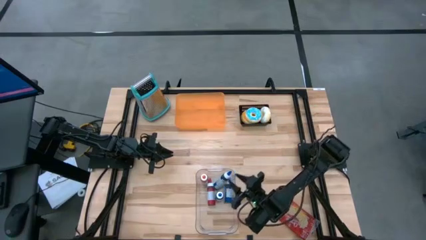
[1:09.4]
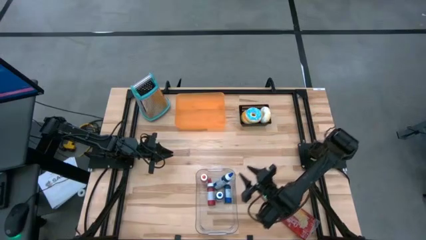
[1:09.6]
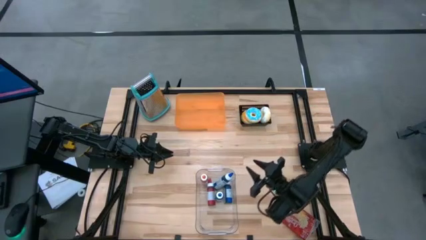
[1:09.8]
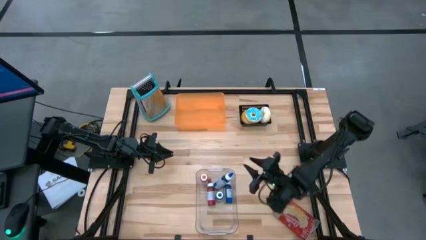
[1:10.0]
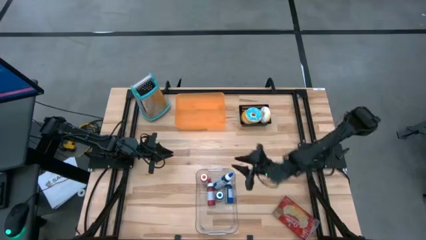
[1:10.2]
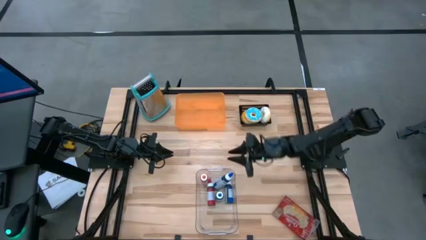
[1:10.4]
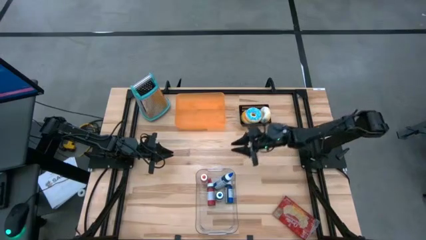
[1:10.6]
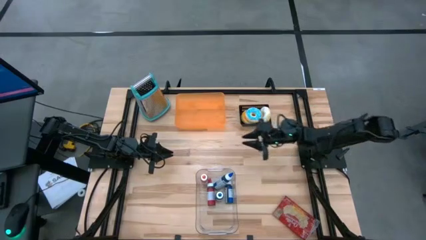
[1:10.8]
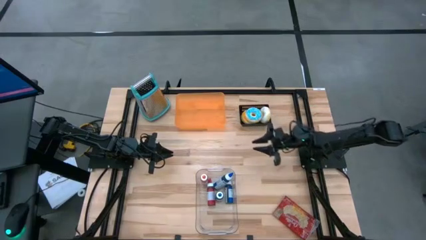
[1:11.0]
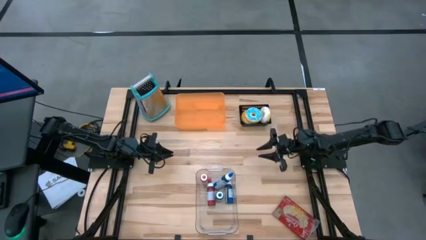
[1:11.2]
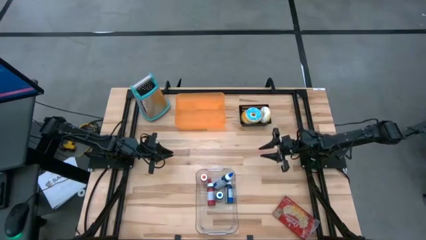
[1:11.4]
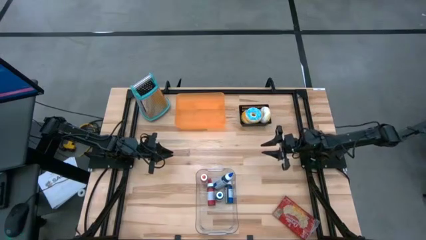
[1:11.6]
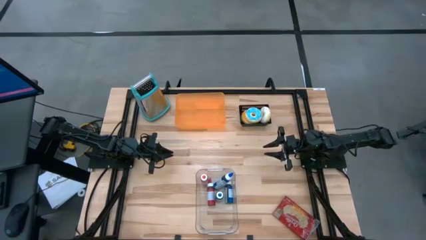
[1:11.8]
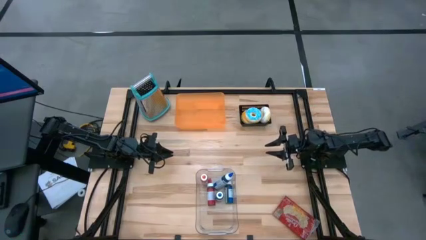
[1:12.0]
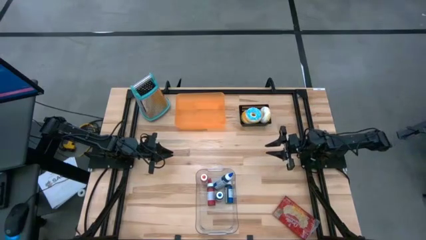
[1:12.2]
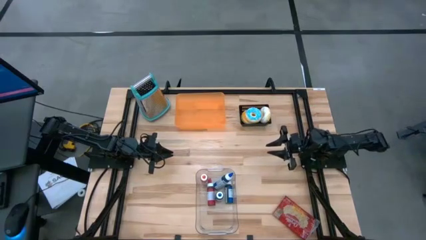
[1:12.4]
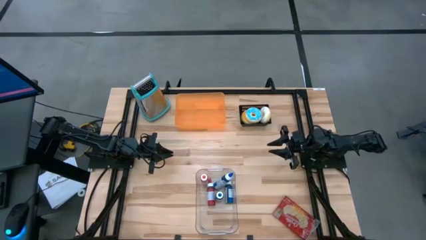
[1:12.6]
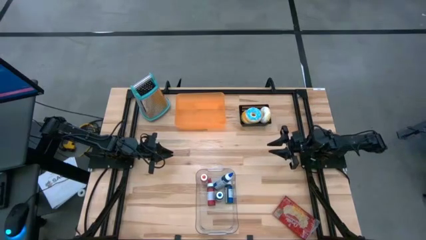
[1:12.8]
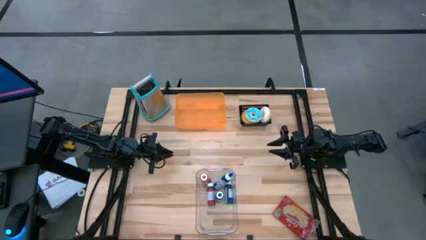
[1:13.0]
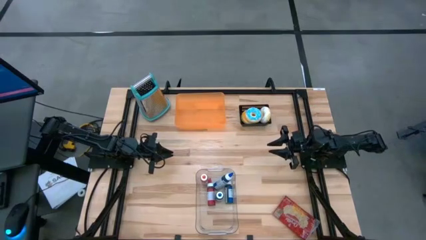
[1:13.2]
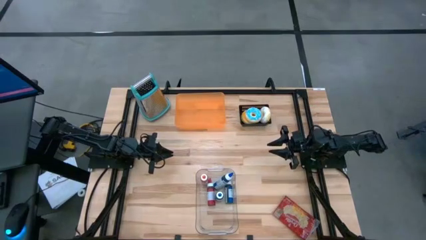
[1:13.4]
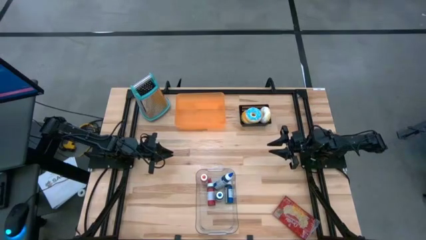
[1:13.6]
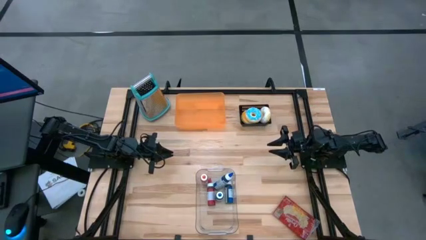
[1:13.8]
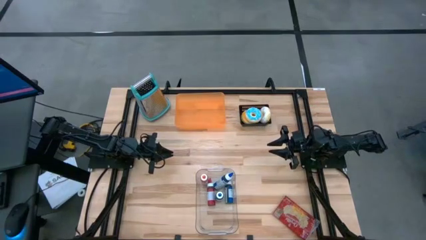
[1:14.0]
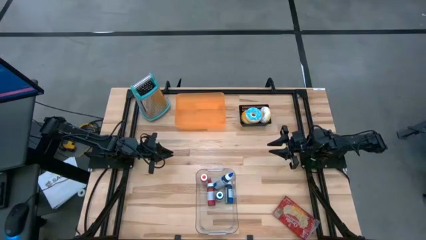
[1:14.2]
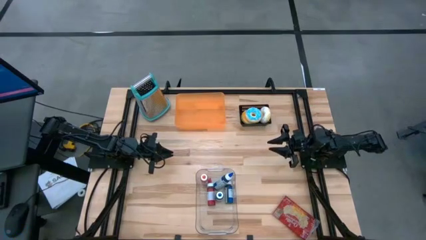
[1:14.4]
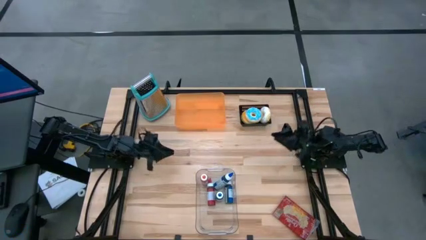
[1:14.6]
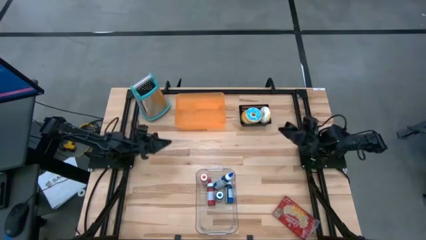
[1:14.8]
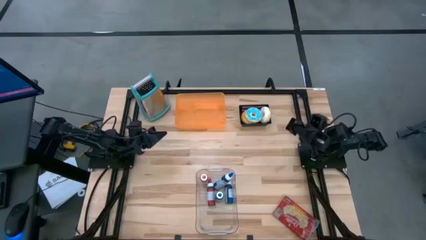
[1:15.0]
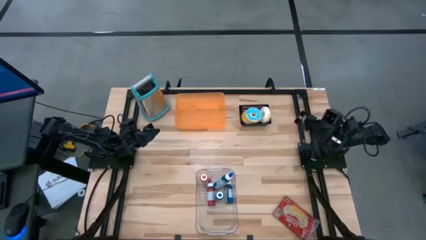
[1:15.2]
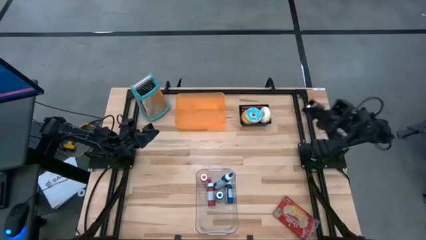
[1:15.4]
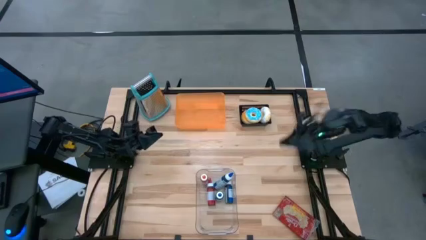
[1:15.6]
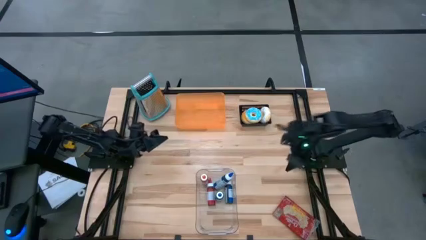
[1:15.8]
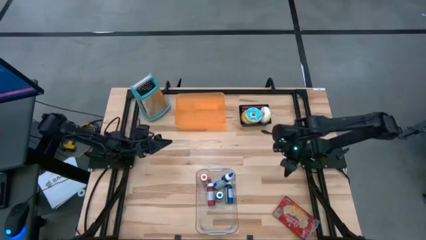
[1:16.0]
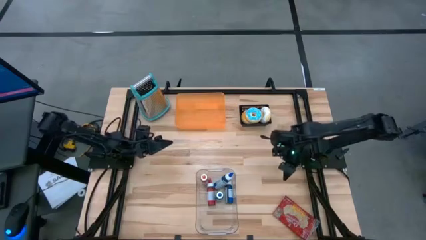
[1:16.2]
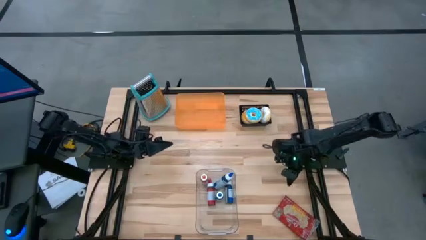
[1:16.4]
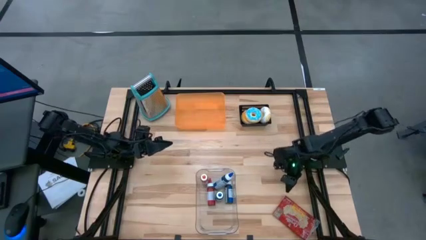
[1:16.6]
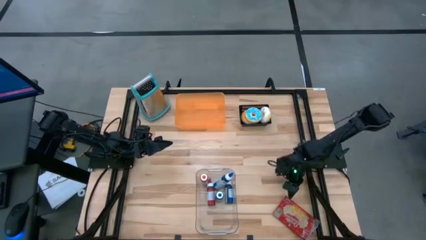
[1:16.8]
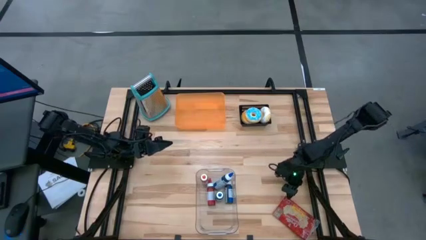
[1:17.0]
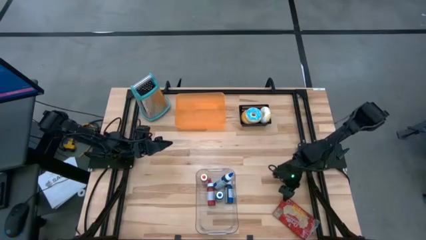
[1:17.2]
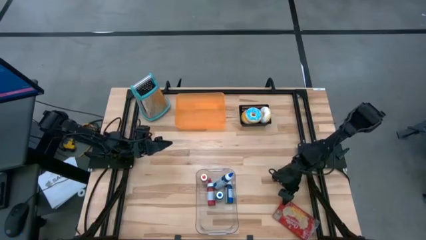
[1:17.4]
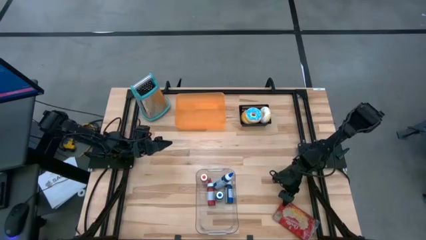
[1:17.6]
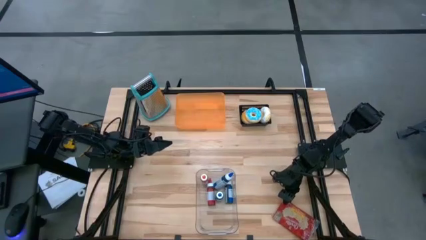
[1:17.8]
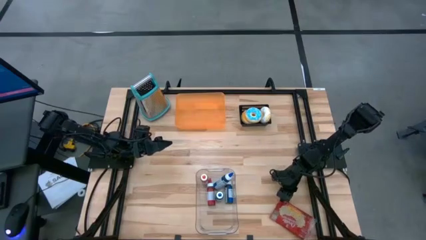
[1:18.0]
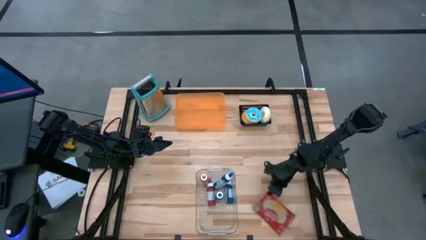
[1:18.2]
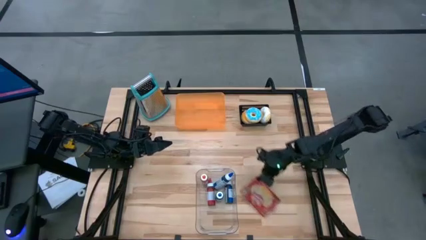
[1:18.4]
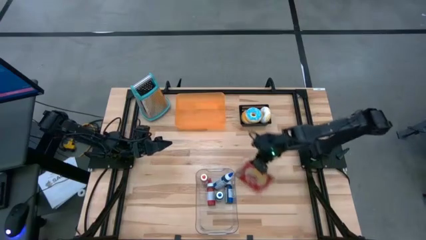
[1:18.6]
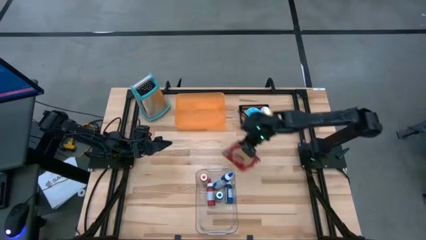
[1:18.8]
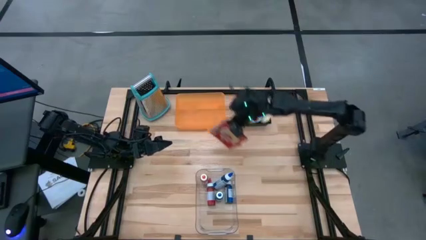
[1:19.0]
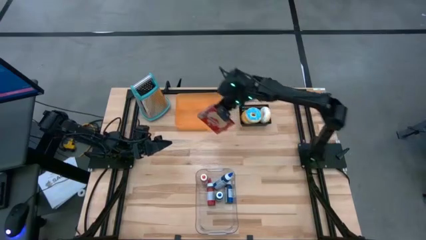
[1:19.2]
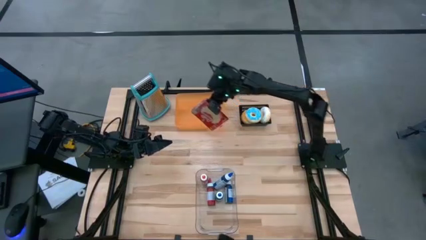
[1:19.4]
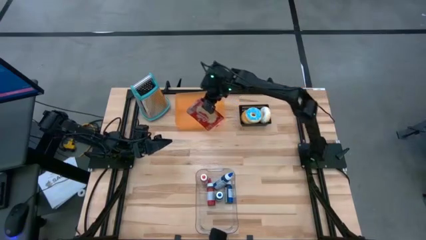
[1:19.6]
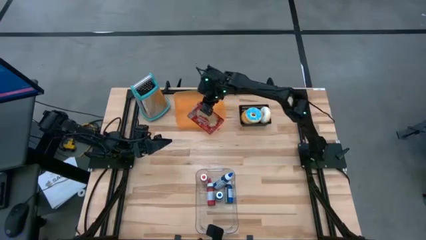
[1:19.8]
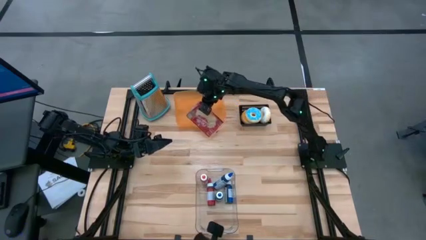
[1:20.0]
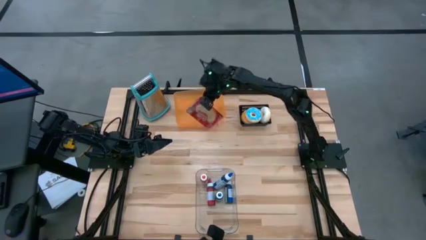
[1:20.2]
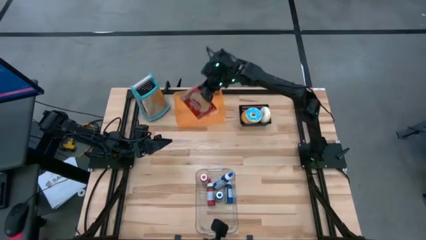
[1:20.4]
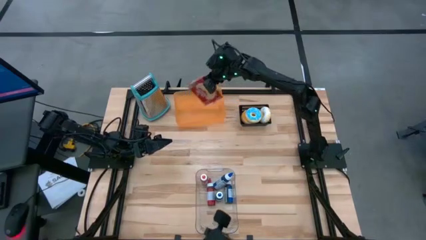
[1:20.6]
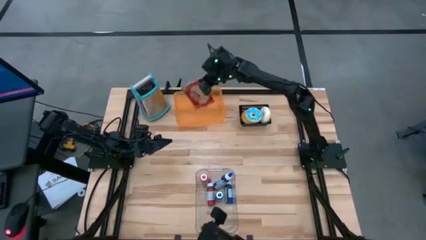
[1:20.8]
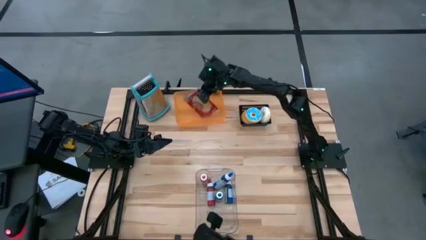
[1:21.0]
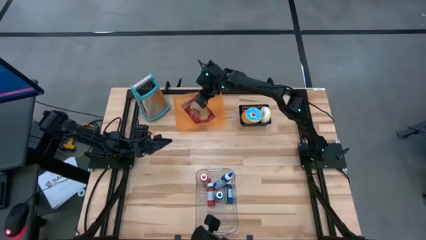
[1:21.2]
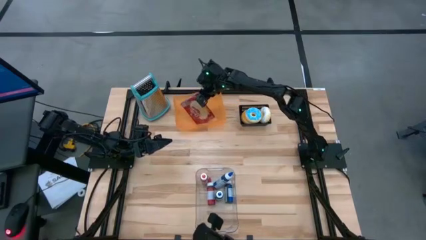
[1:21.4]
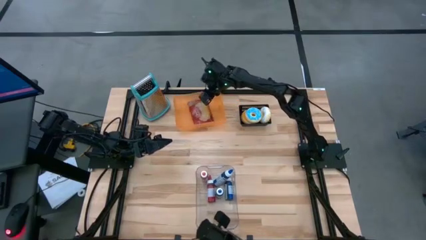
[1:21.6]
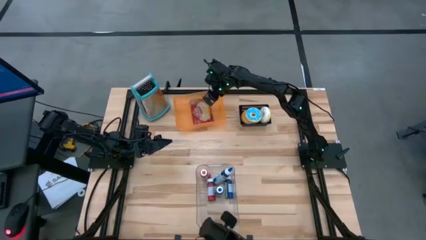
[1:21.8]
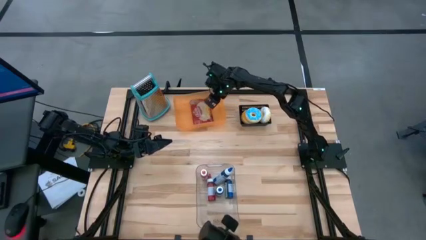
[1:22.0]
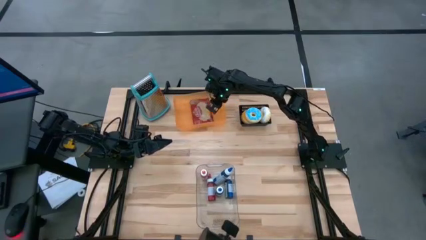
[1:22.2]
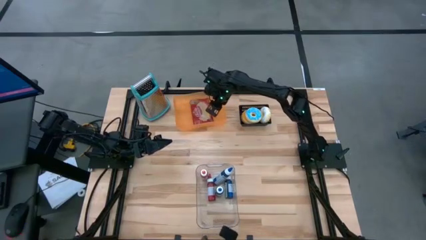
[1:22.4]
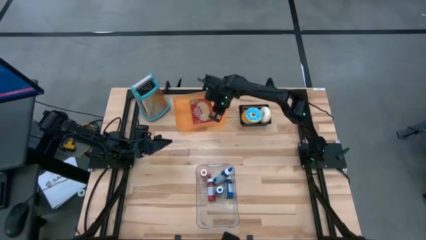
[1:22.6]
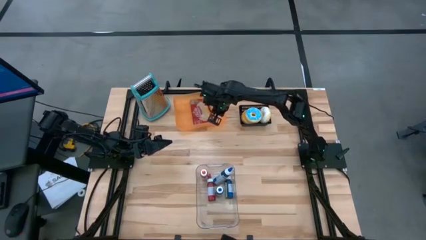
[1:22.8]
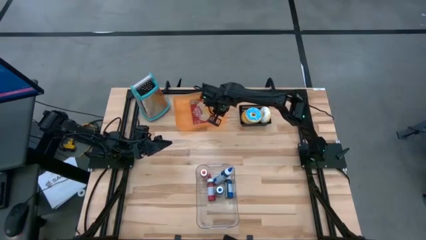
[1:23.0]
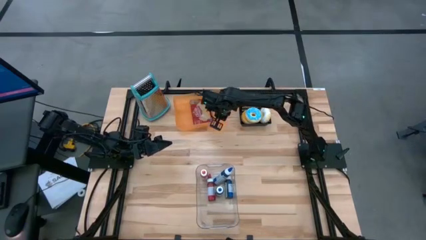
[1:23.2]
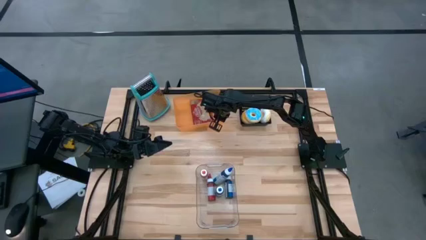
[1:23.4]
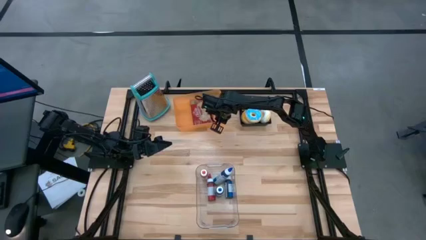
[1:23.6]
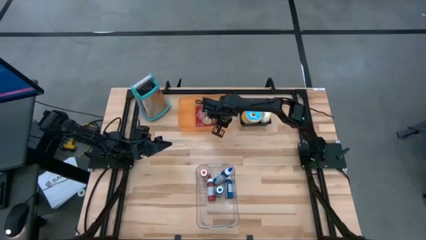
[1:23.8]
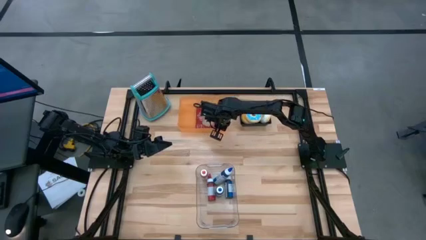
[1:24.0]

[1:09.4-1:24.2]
Put the red popcorn bag into the orange bin
